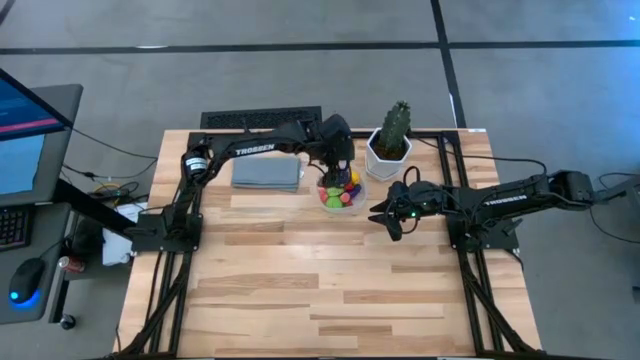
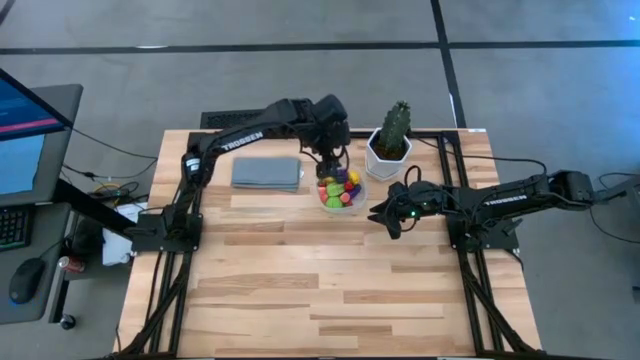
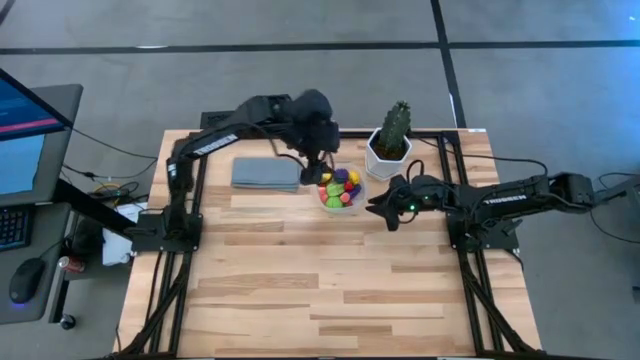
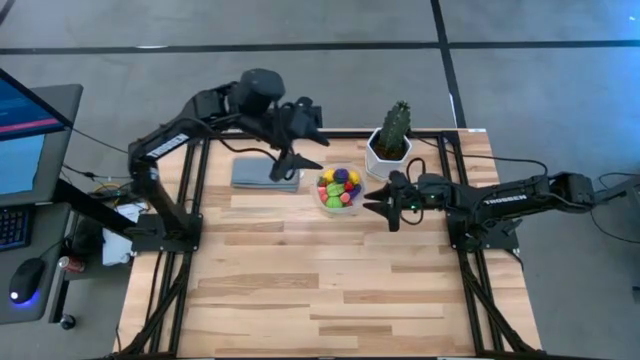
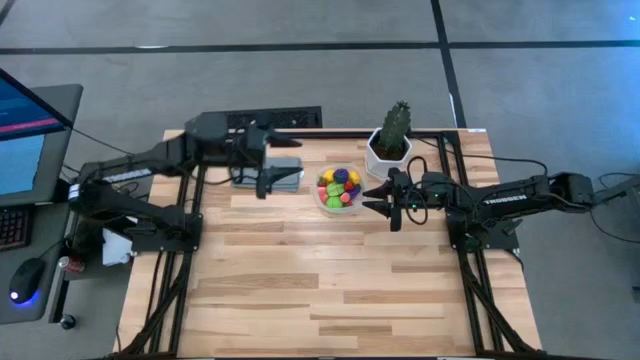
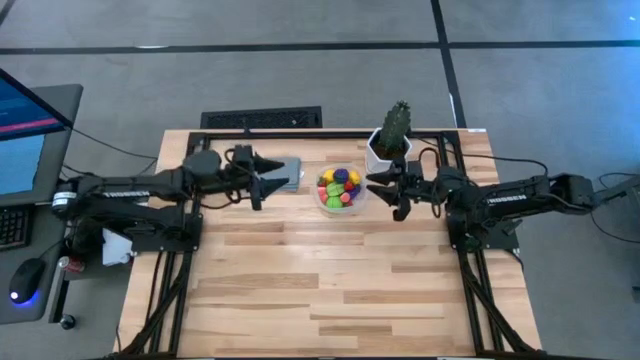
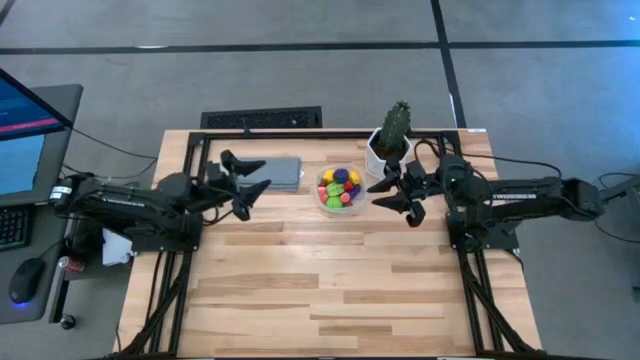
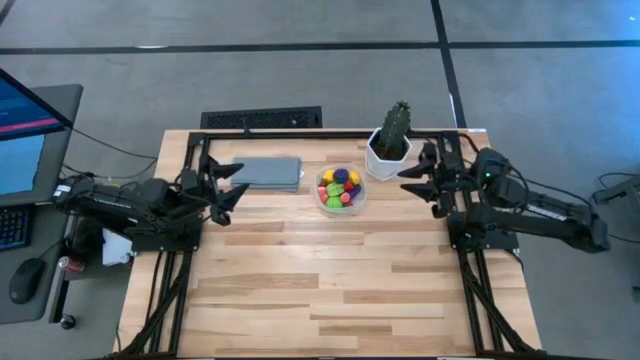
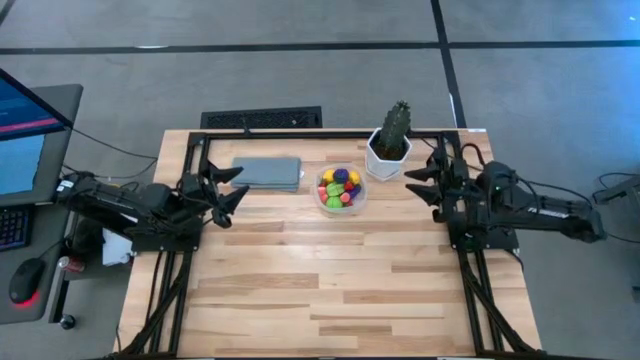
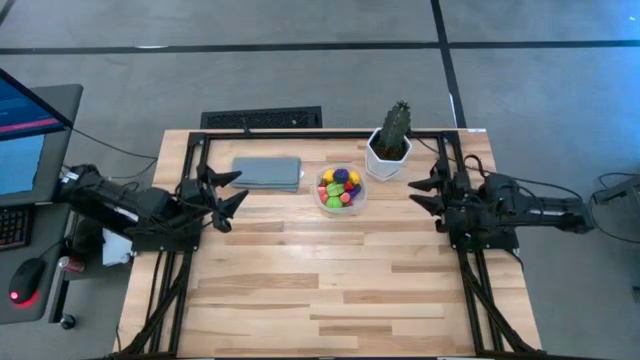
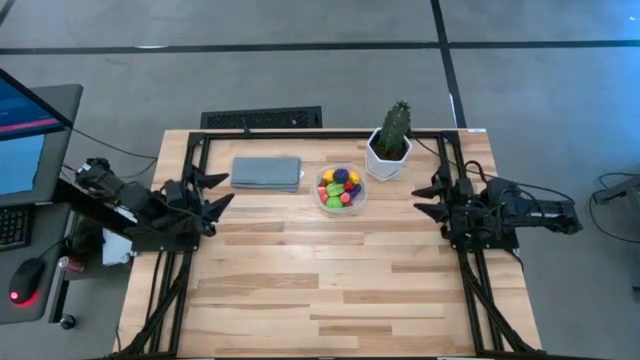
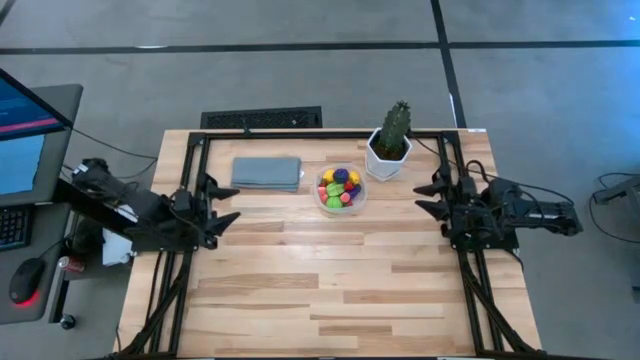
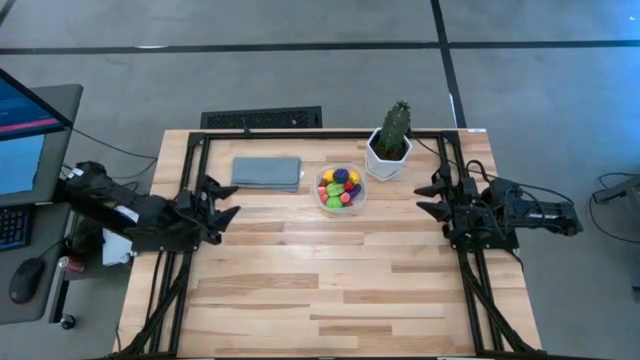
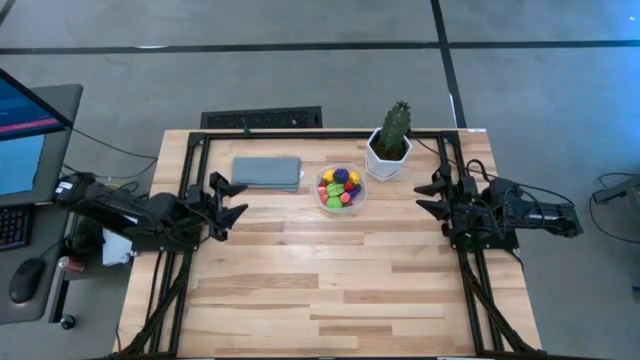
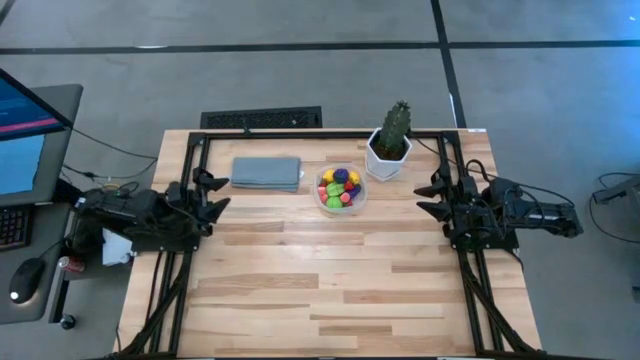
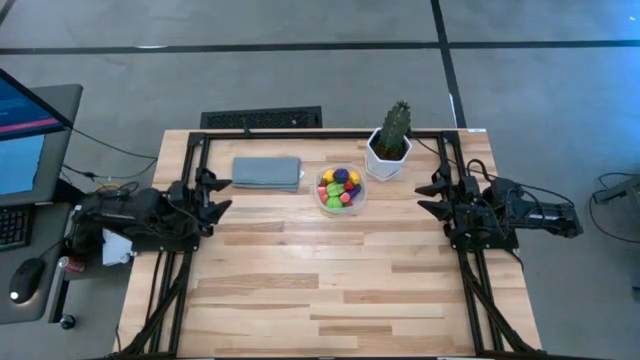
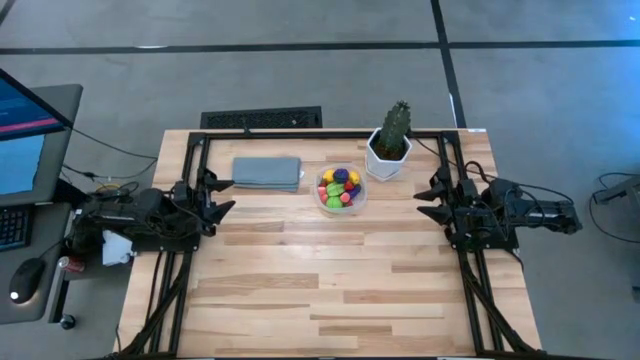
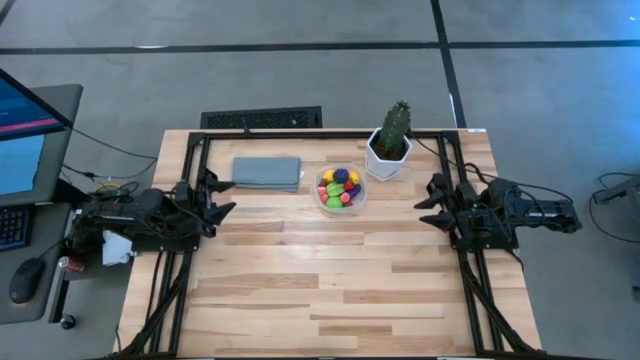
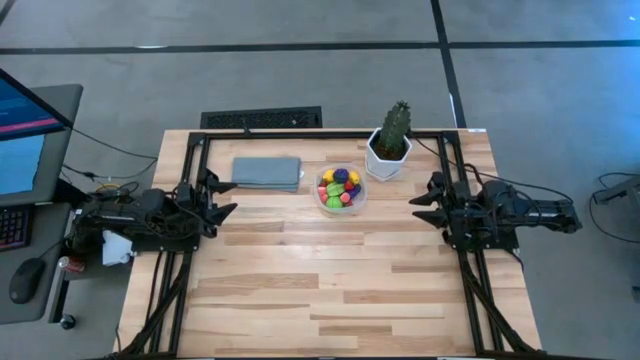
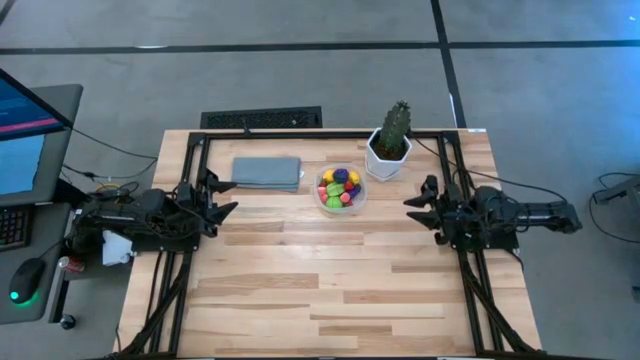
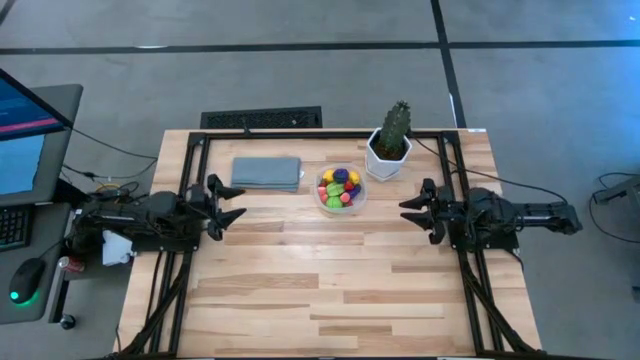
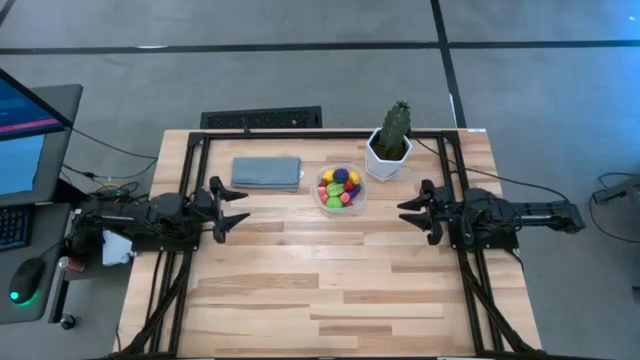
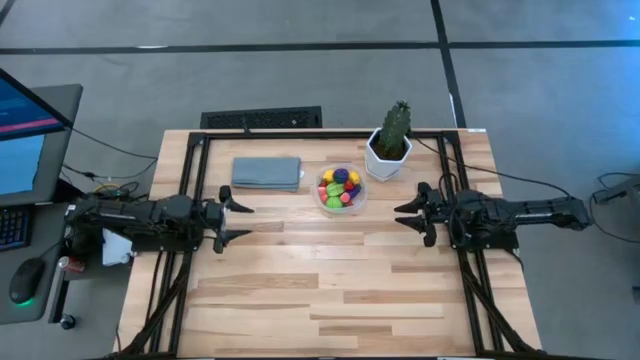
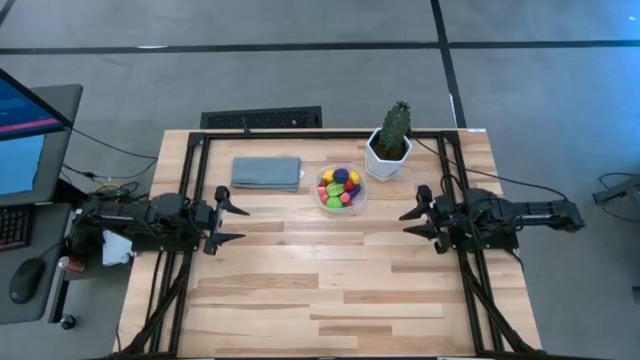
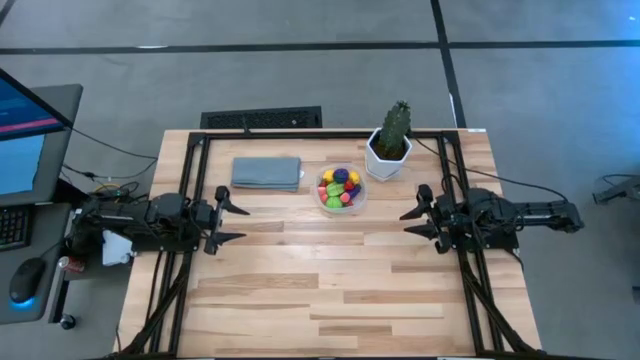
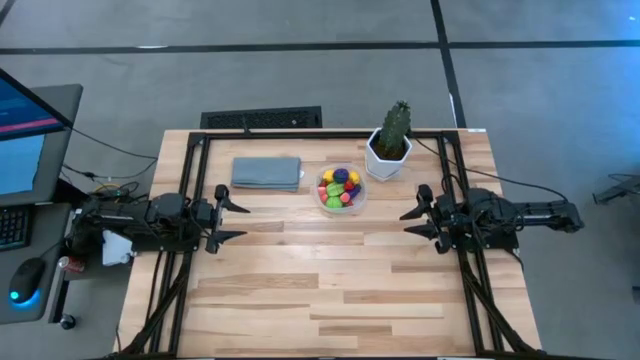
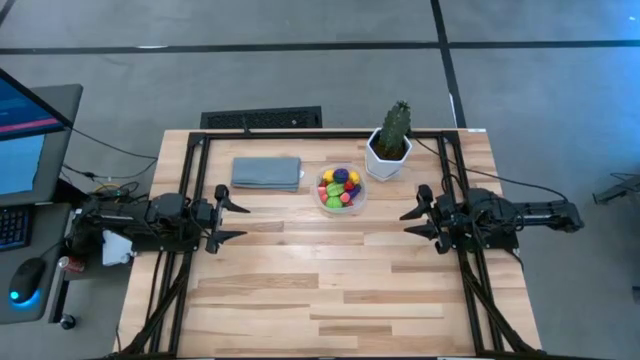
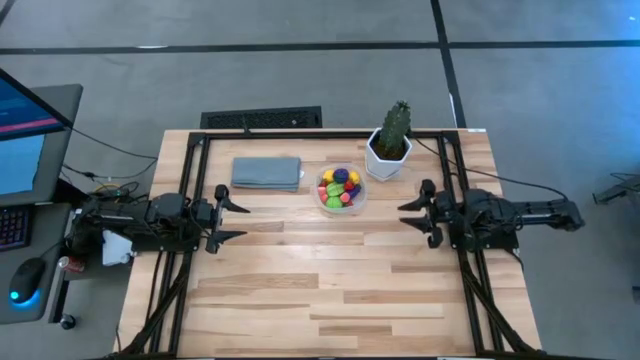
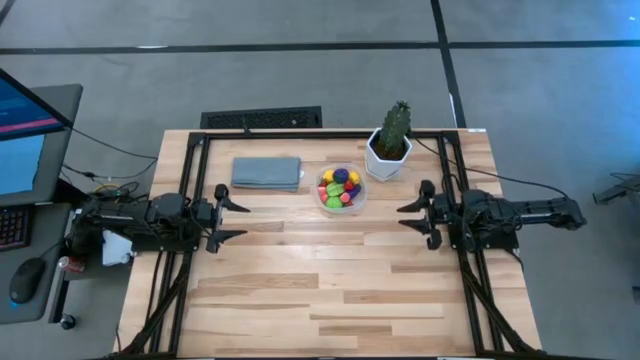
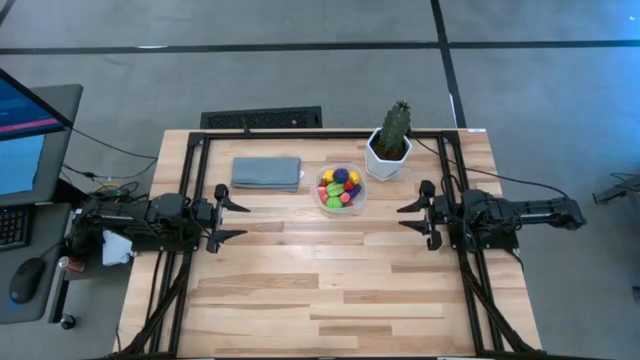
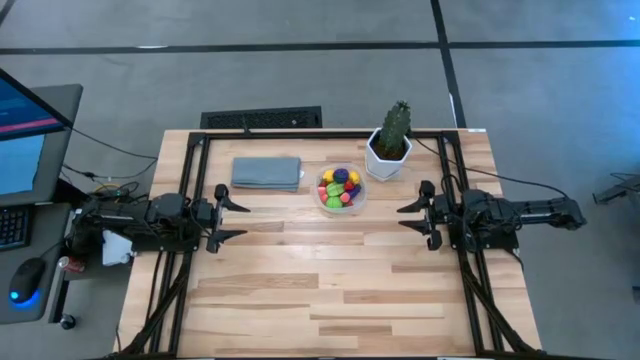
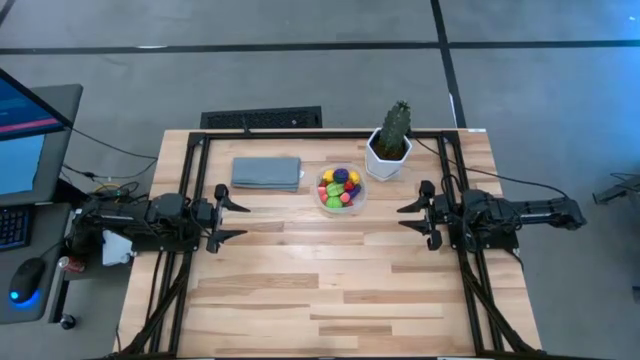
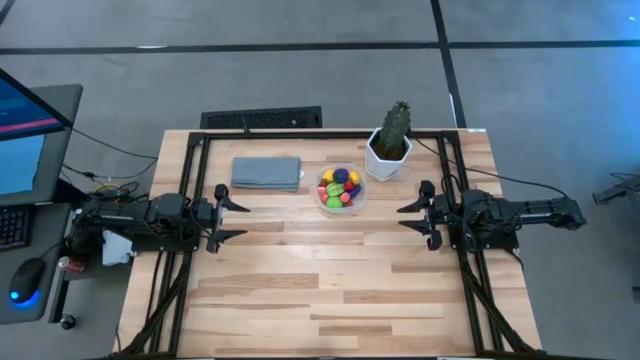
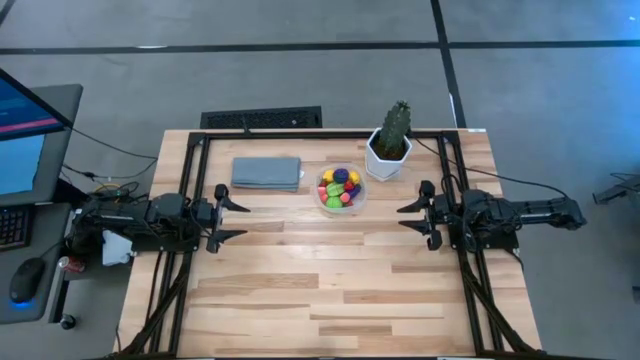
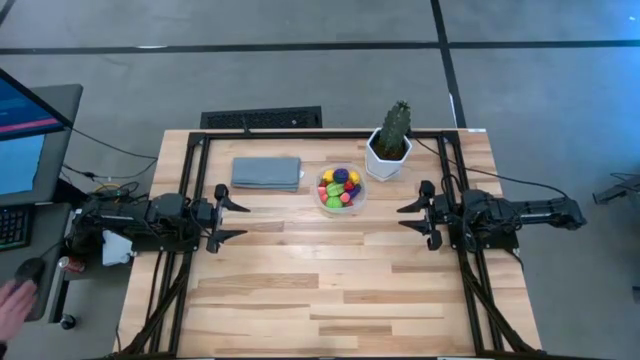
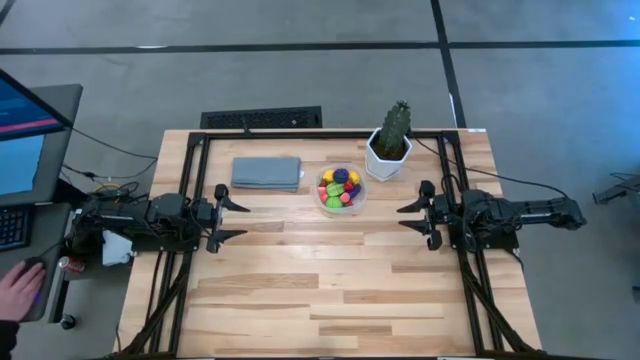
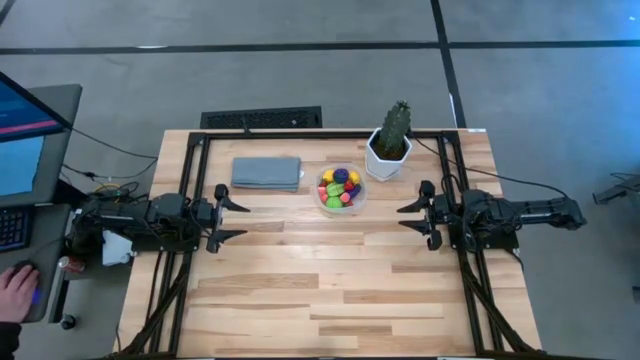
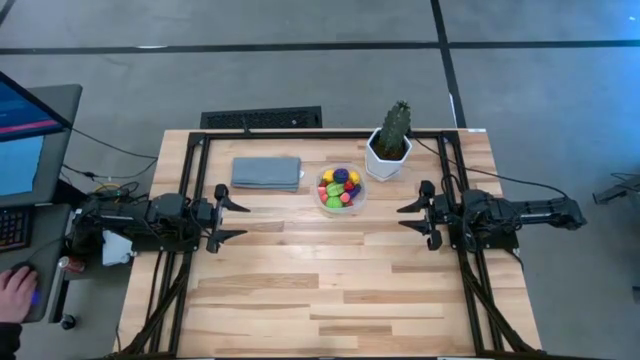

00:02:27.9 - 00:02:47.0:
Task: Pick and placing Produce into tupperware
Return to Home Position

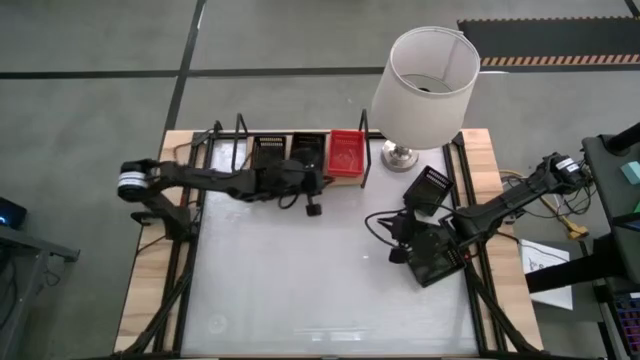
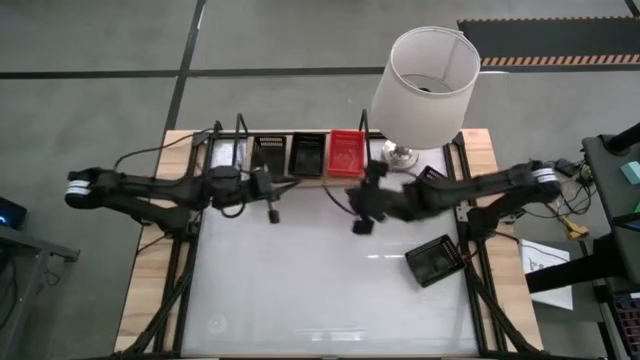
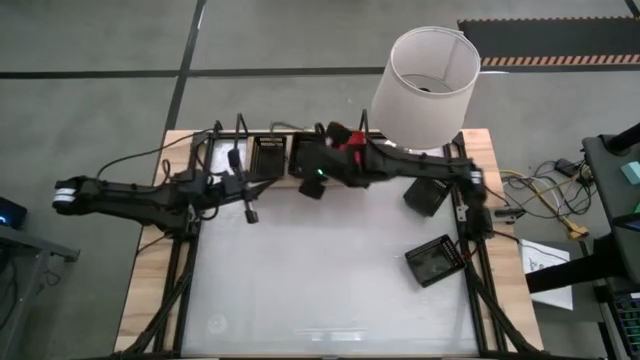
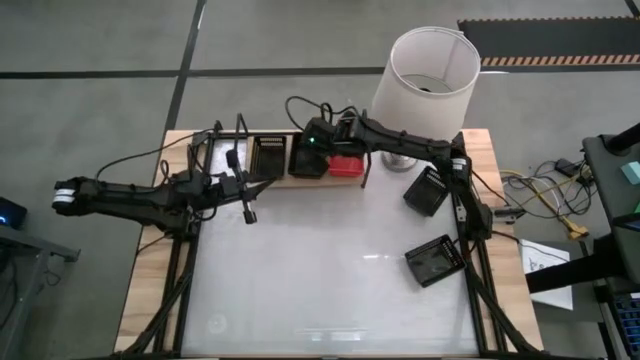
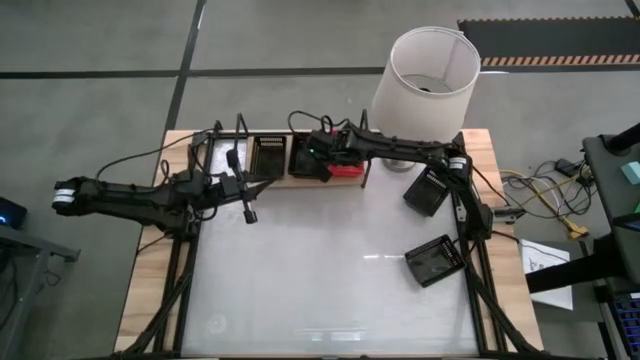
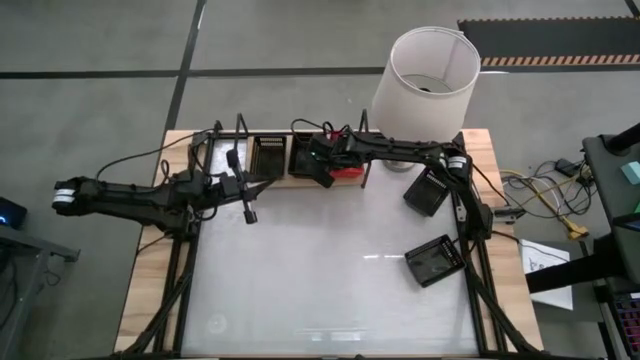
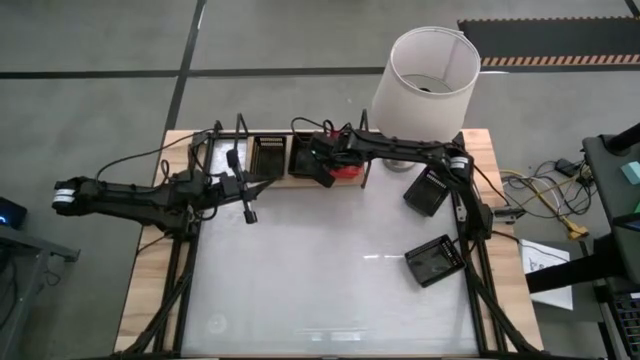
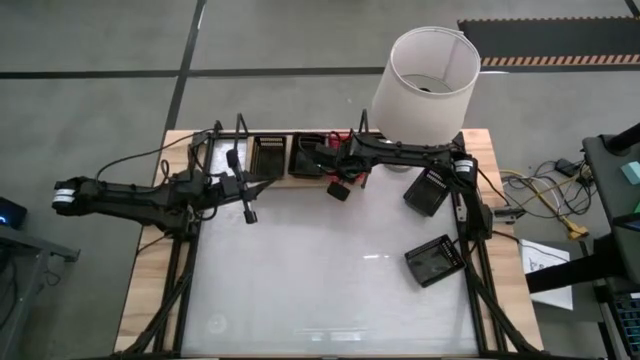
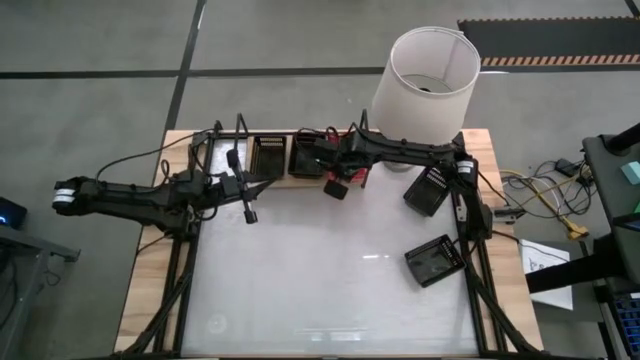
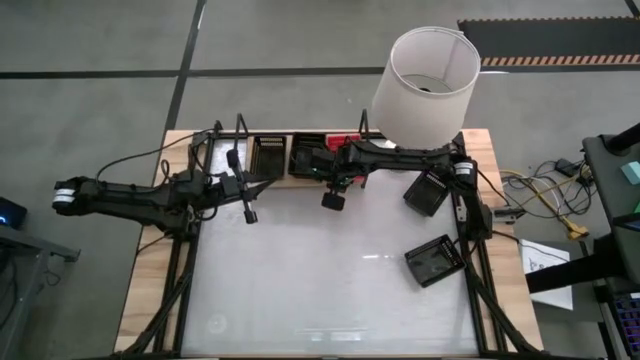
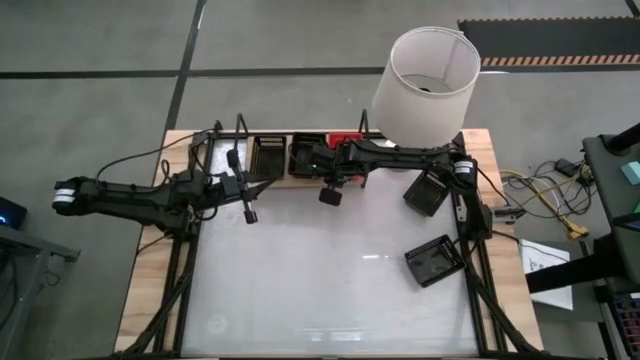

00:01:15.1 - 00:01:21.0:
Task: Stack baskets on shelf by color
Adjust the red bins on the shelf
